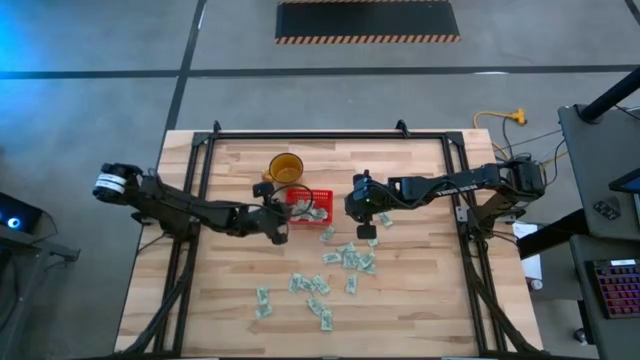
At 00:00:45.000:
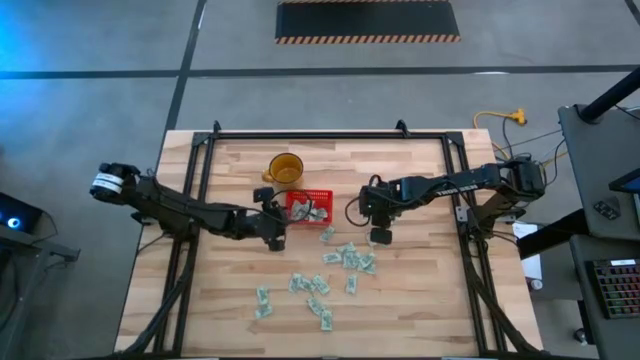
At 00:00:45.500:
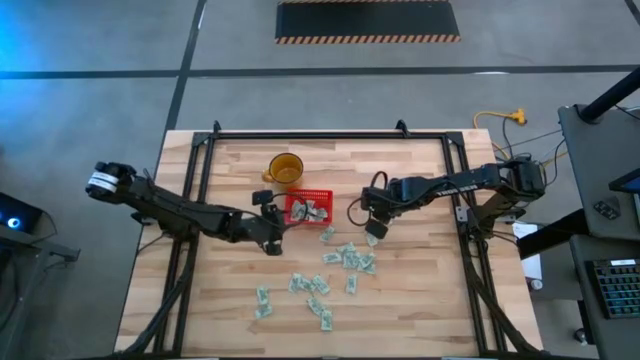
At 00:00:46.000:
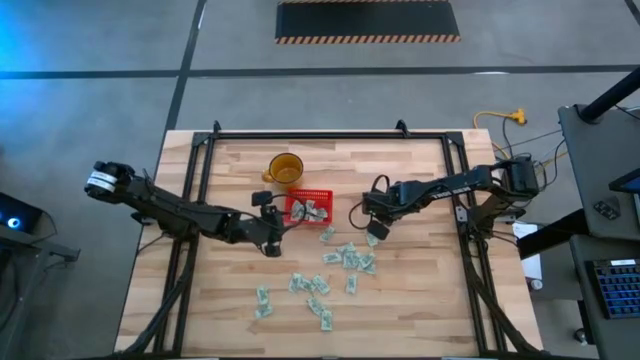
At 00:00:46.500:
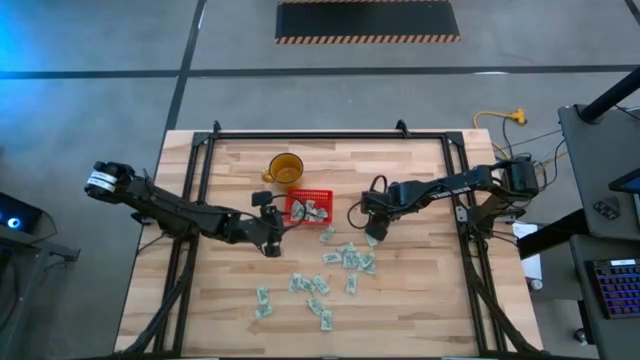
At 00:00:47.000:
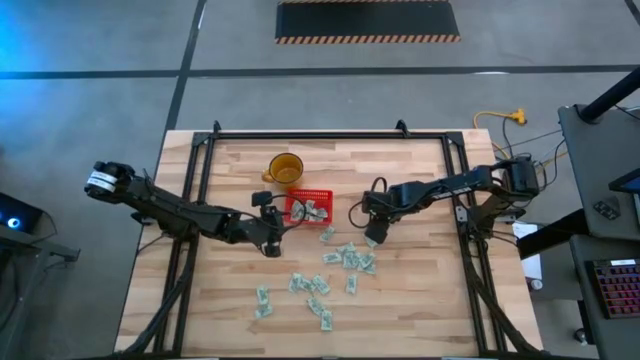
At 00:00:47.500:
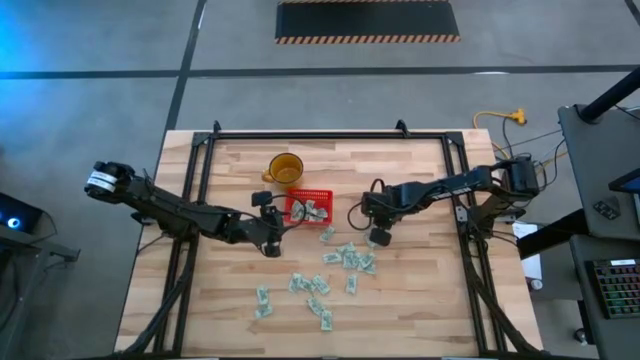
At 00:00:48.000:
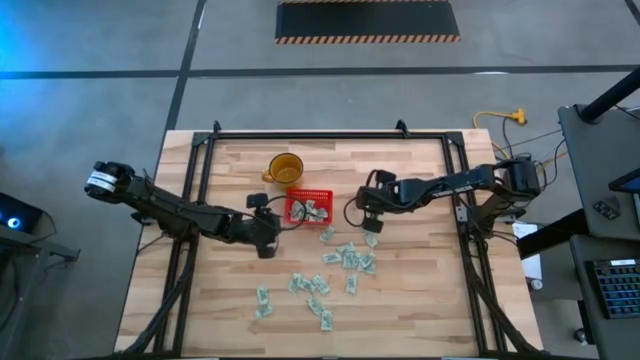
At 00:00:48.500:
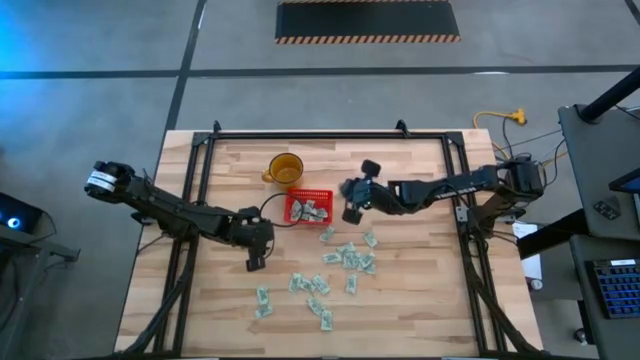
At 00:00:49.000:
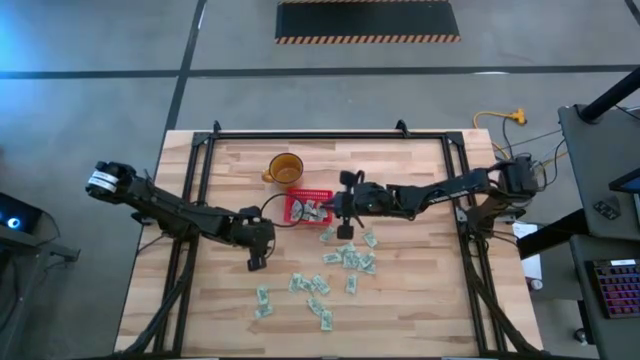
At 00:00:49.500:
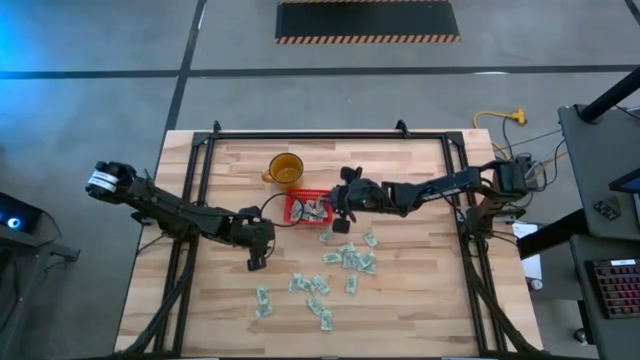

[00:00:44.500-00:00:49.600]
Task: Pick and place Stevia / Truvia into bins
Put the gray stevia packet into the red basket

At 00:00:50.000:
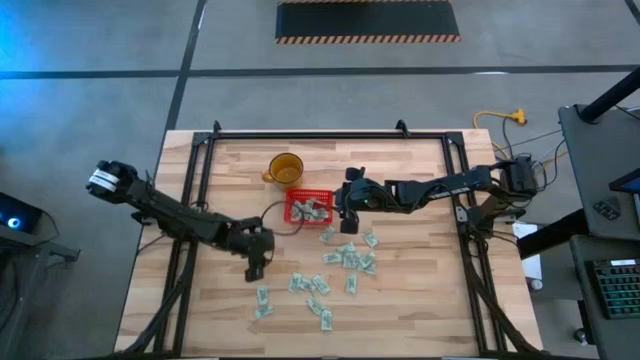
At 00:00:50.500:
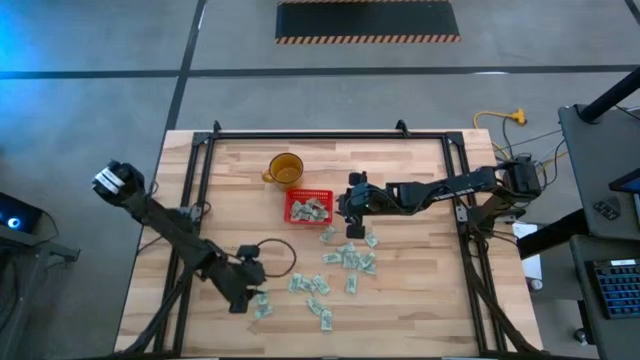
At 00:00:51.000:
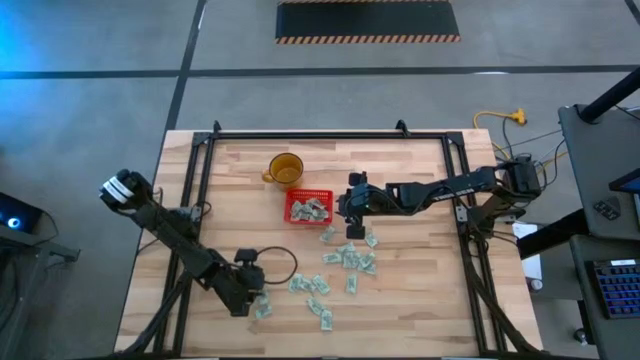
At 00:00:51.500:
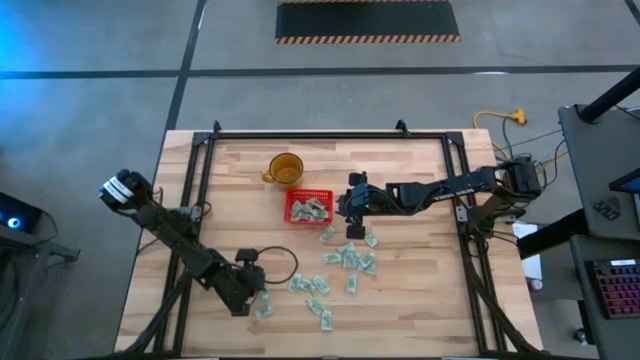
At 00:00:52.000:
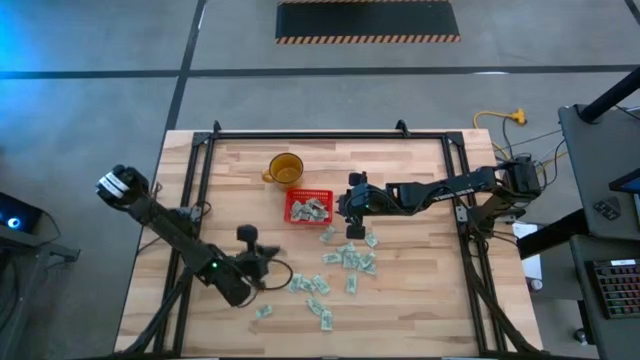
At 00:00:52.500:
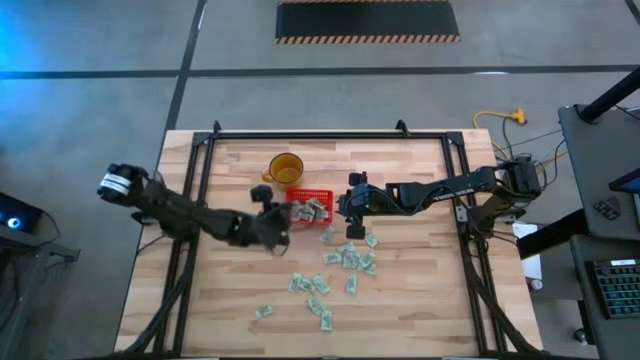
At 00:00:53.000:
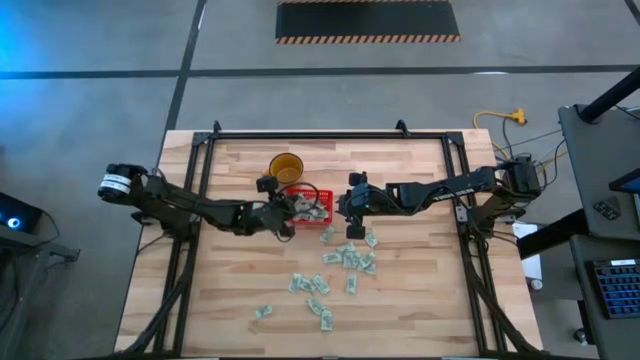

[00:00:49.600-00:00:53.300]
Put the gray stevia packet into the red basket

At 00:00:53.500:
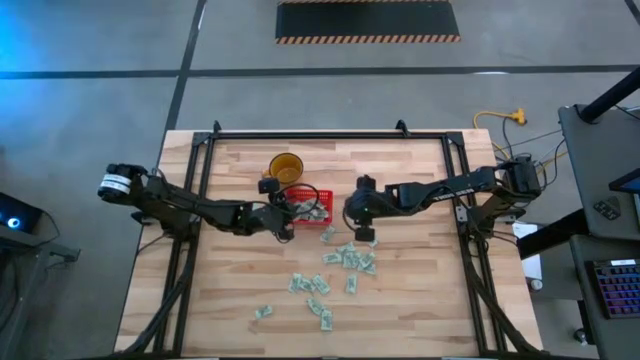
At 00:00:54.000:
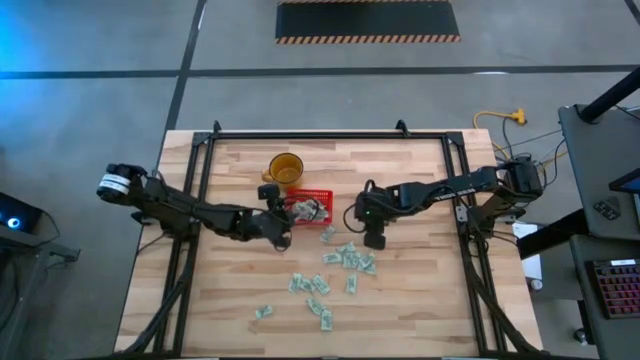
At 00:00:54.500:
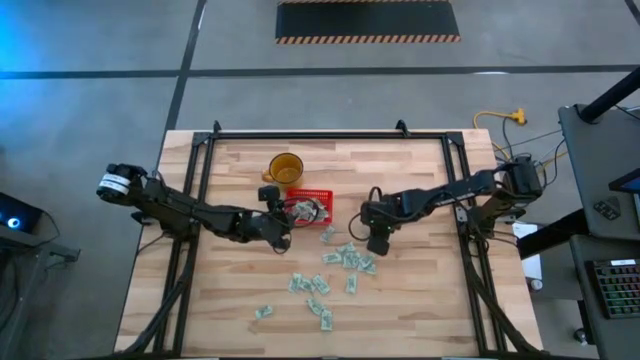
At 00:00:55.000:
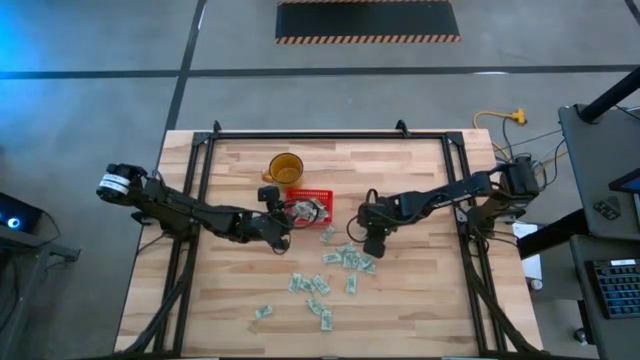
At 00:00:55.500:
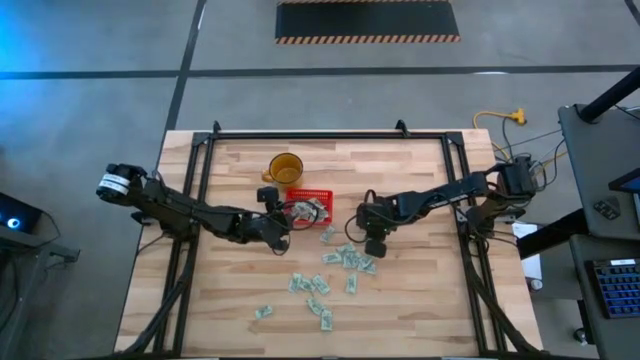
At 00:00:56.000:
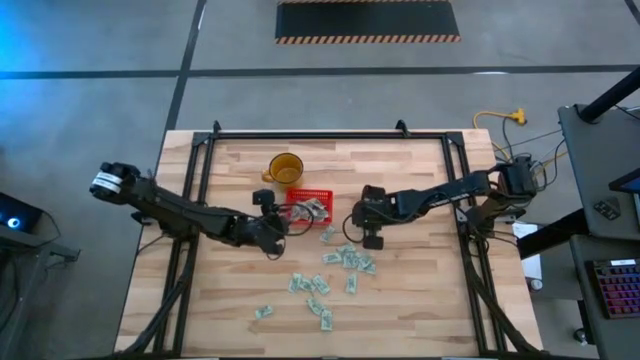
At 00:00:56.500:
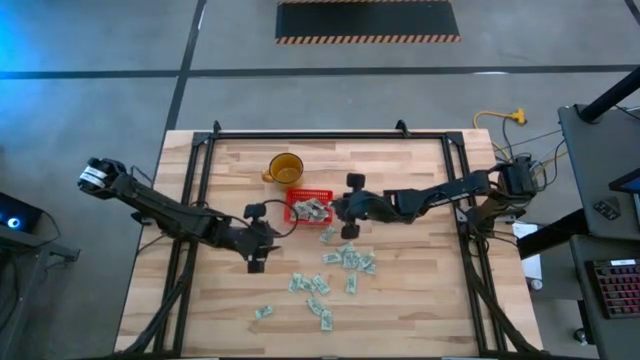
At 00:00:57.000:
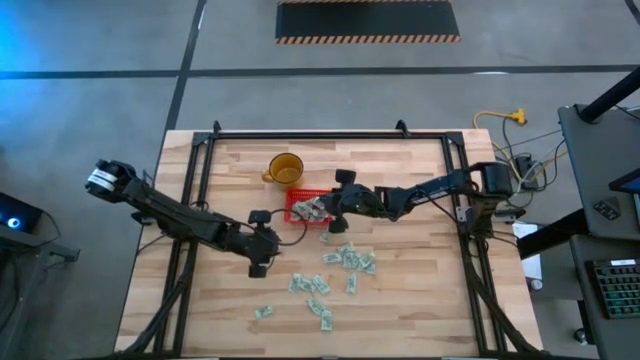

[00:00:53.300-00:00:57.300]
Put the gray stevia packet into the red basket

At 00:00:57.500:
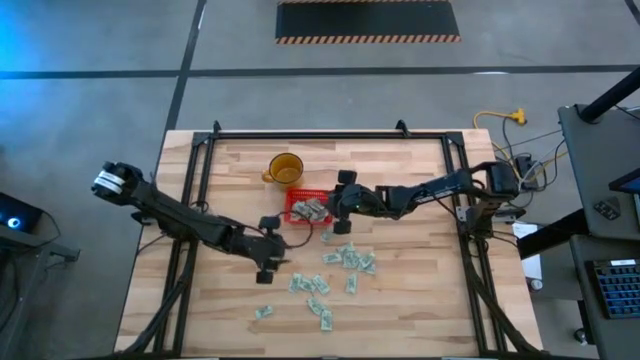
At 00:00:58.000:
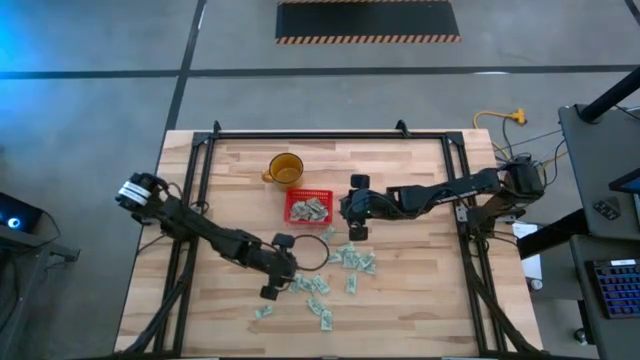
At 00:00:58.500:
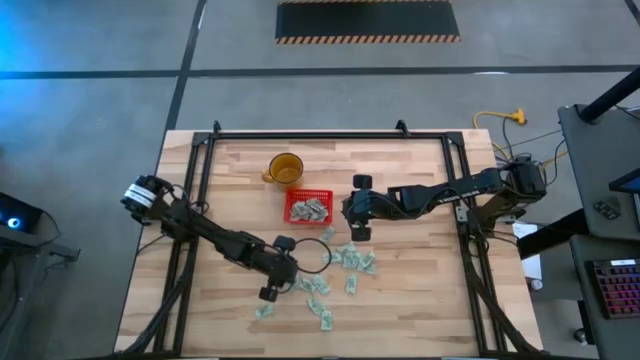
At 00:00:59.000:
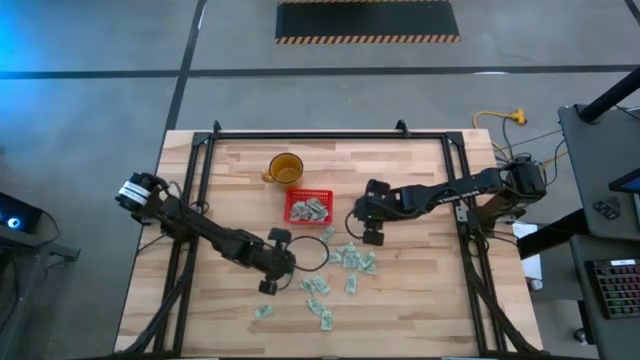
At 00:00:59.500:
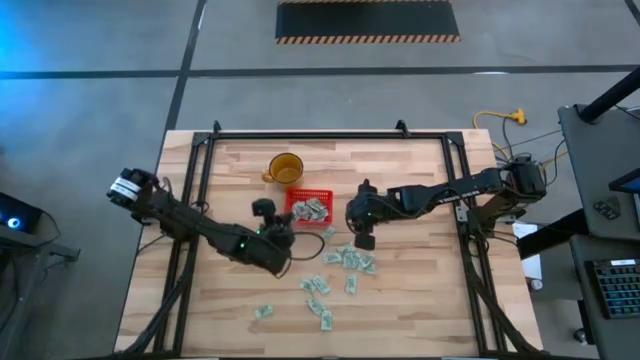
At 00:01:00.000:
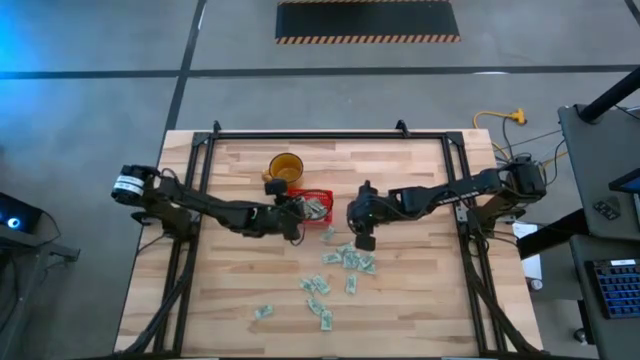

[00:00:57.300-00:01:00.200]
Put the gray stevia packet into the red basket

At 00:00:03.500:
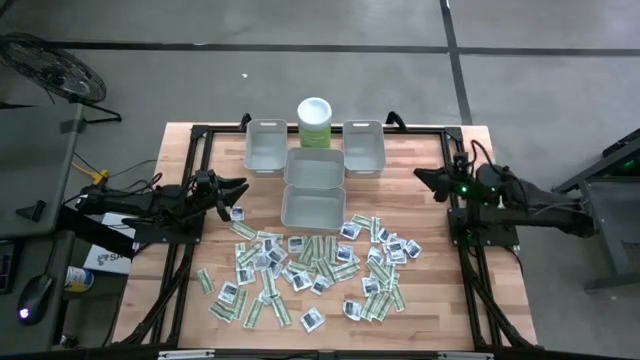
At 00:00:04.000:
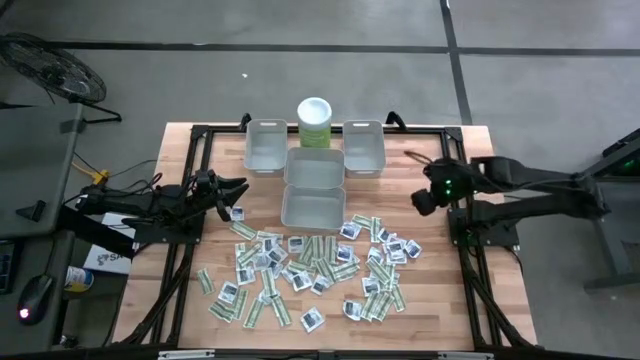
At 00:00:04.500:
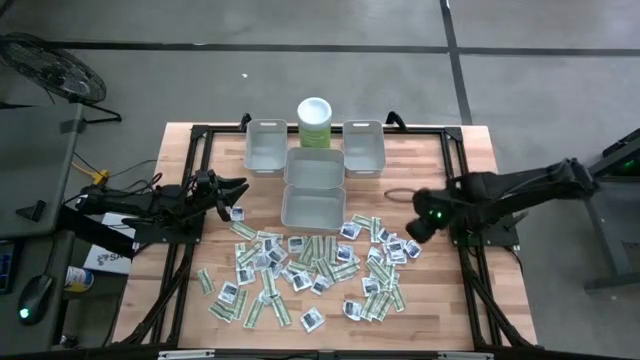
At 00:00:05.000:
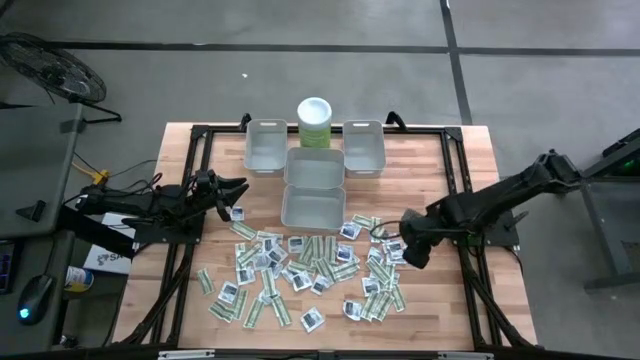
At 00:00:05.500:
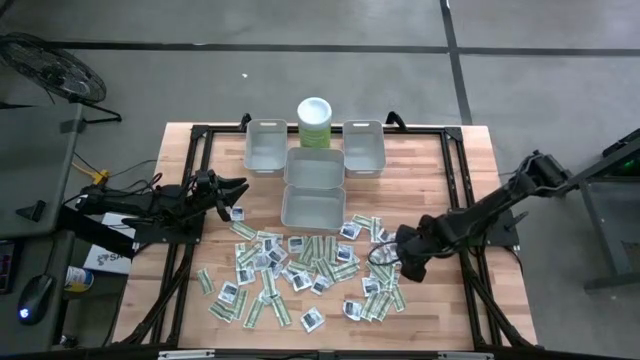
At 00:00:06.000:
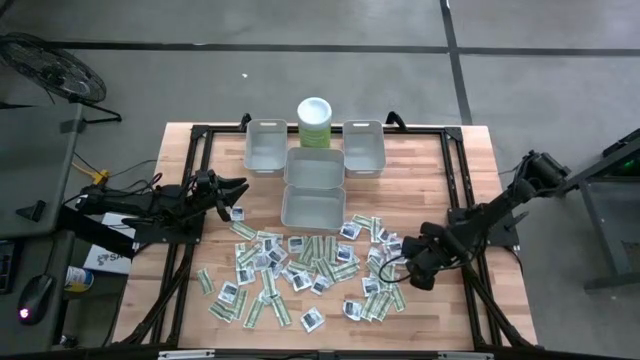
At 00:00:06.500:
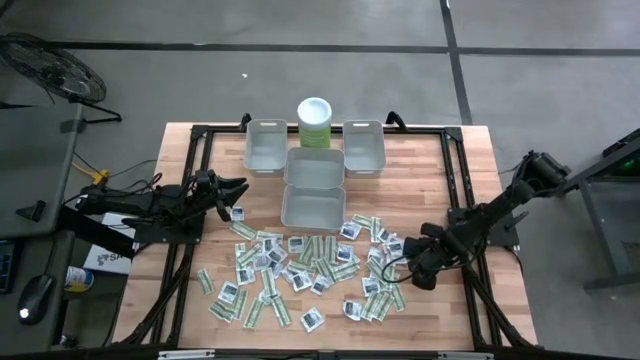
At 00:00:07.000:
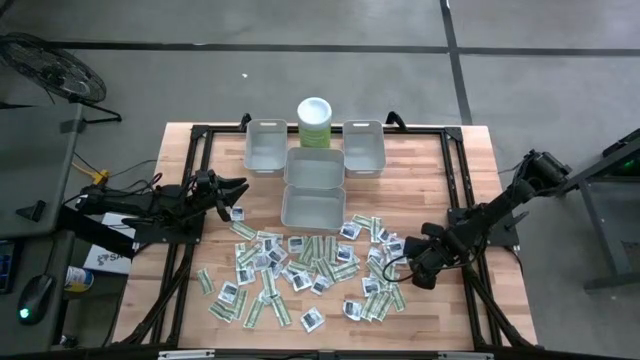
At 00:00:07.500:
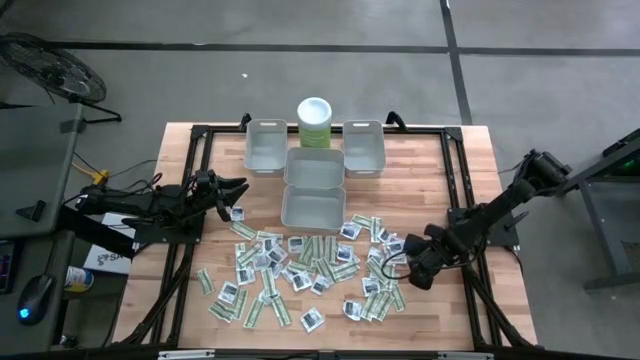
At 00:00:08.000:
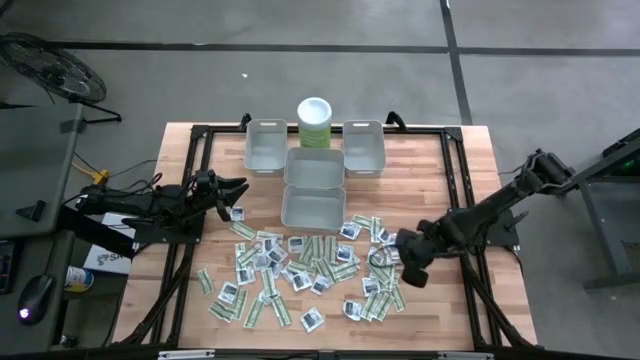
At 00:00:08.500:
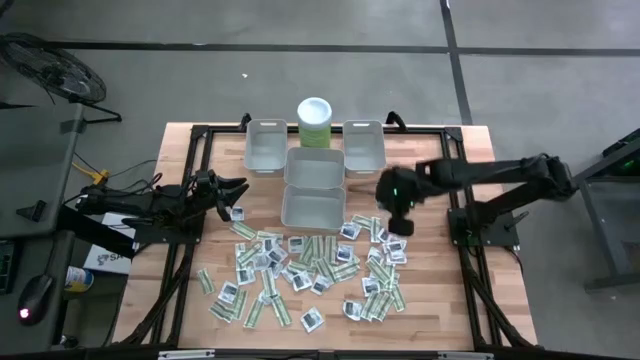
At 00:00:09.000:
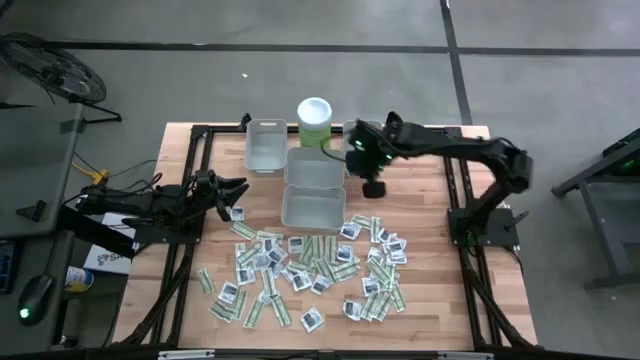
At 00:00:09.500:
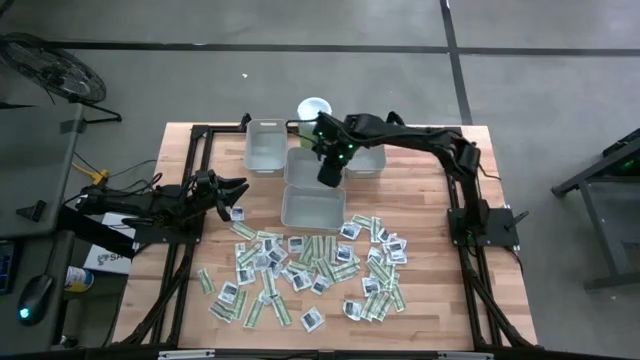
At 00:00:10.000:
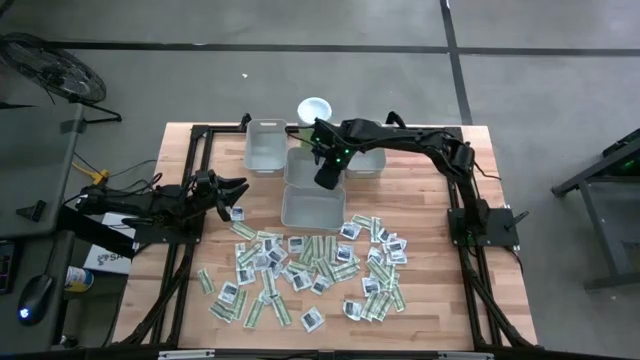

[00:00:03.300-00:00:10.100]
Task: Pick & Place First Aid Supplies
Put the alcohol pad into the top center bin
